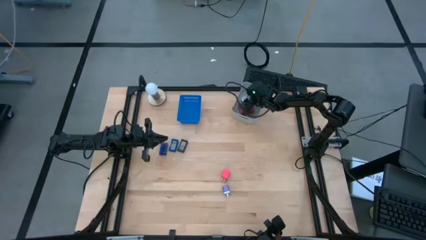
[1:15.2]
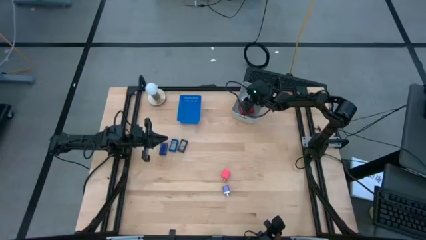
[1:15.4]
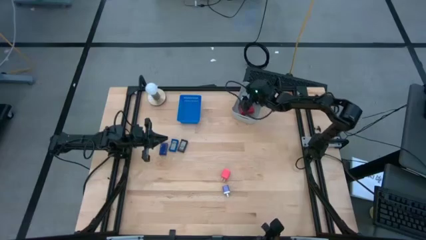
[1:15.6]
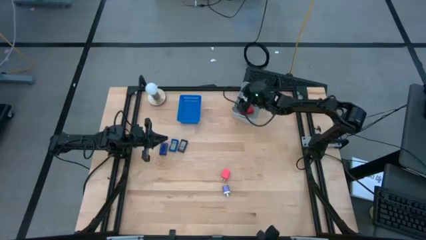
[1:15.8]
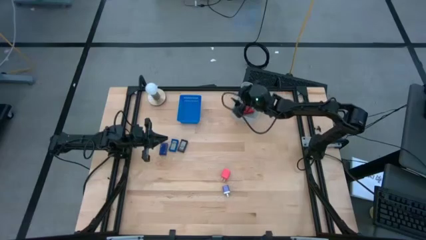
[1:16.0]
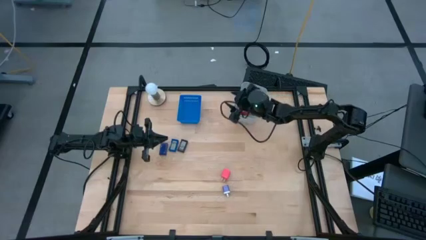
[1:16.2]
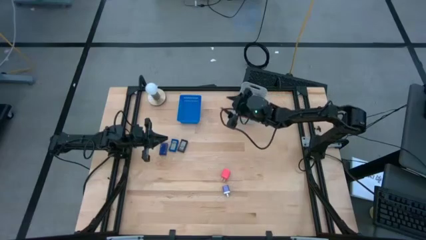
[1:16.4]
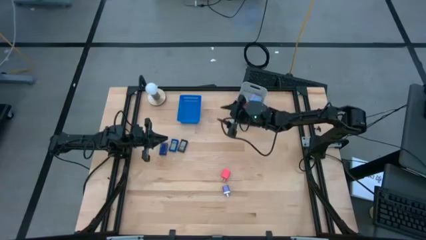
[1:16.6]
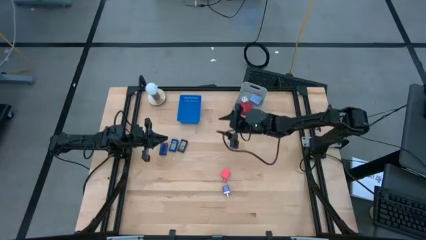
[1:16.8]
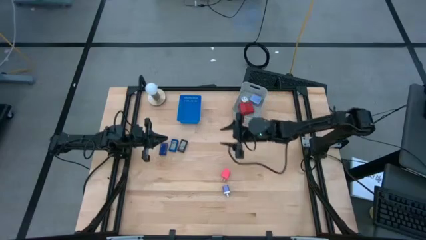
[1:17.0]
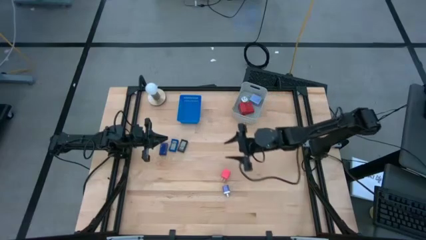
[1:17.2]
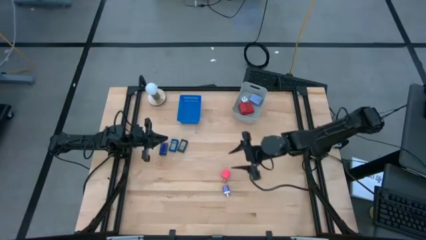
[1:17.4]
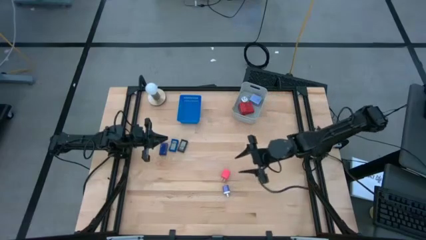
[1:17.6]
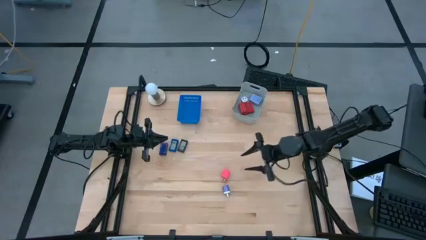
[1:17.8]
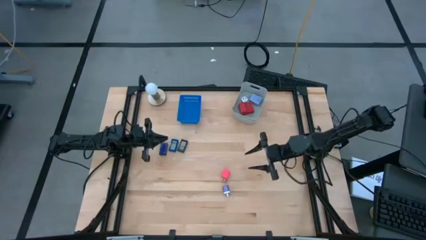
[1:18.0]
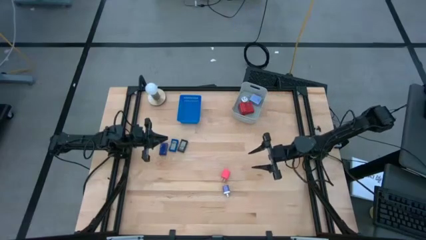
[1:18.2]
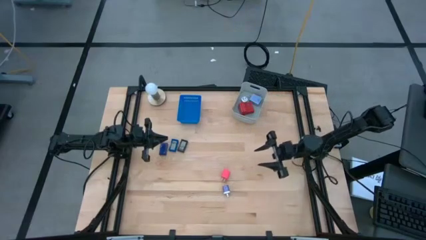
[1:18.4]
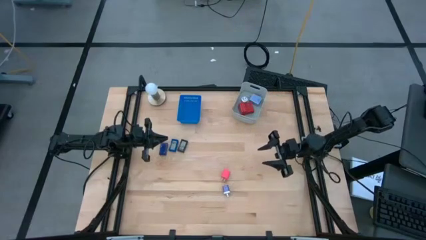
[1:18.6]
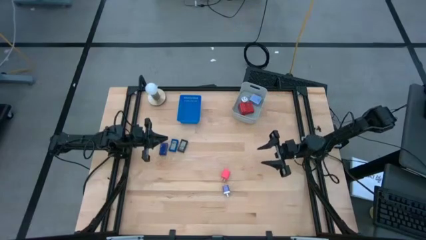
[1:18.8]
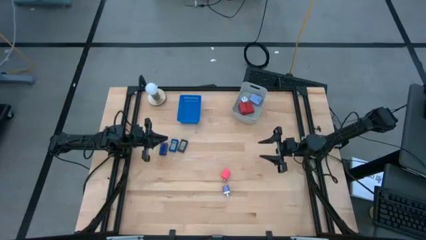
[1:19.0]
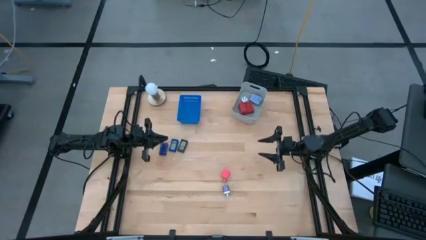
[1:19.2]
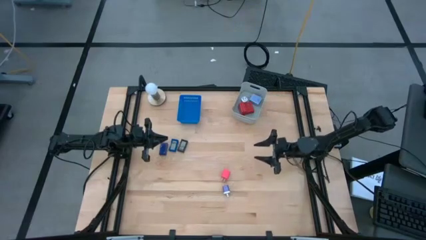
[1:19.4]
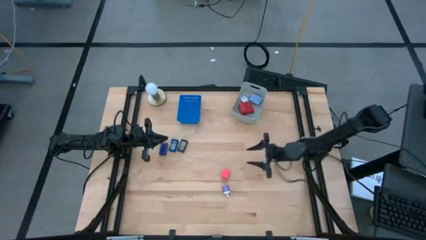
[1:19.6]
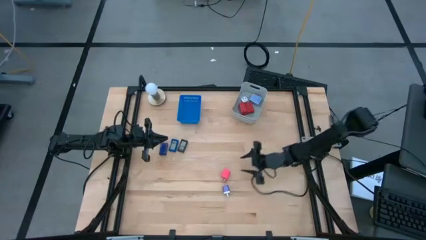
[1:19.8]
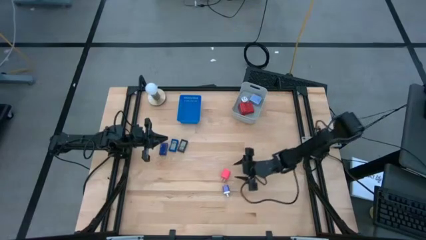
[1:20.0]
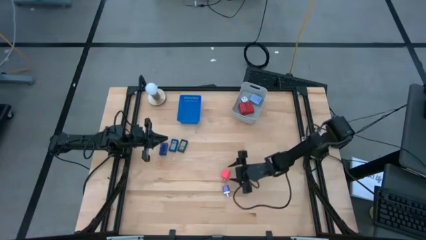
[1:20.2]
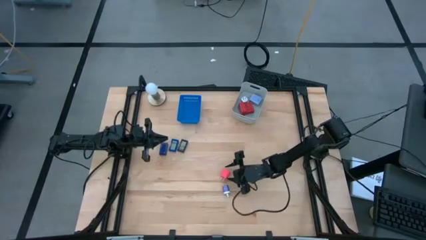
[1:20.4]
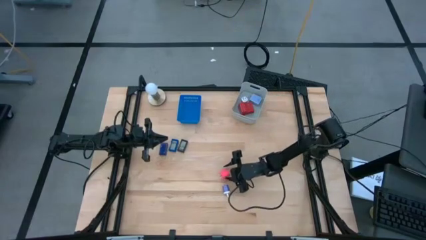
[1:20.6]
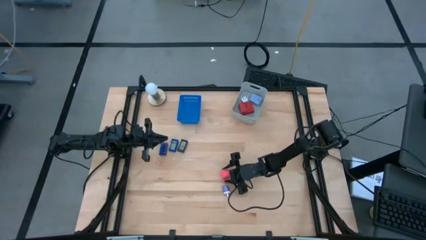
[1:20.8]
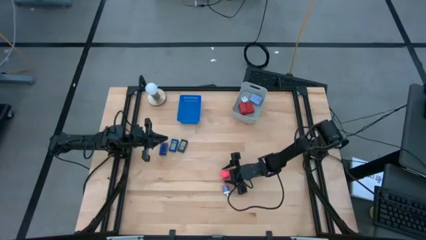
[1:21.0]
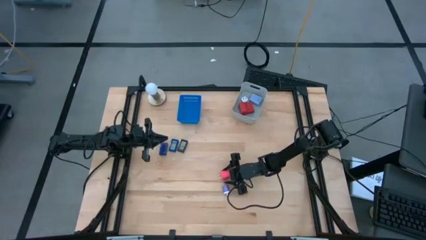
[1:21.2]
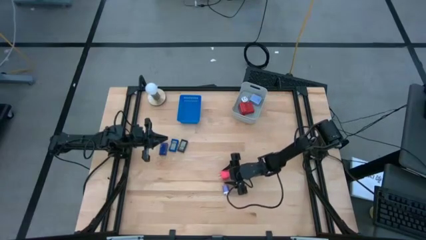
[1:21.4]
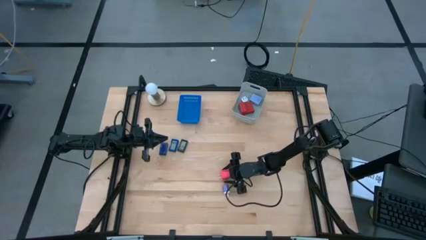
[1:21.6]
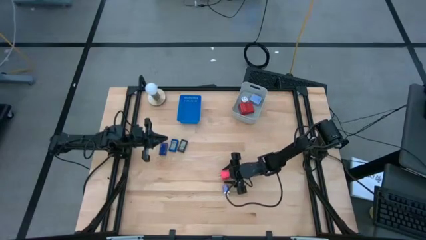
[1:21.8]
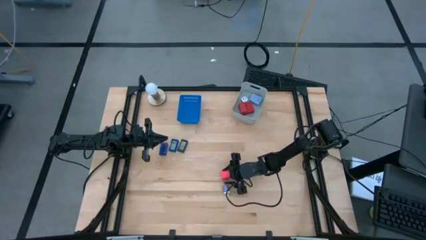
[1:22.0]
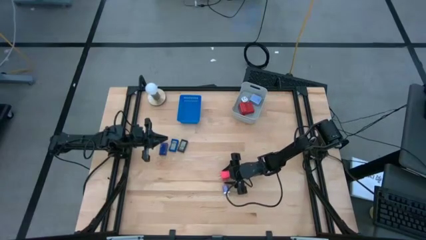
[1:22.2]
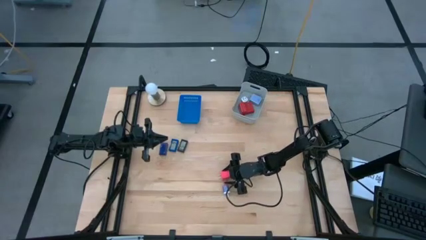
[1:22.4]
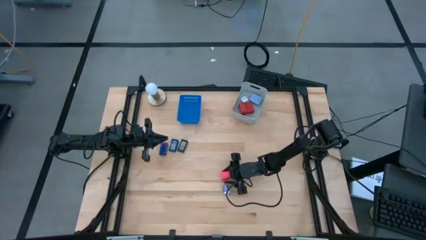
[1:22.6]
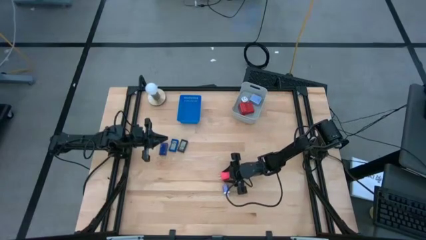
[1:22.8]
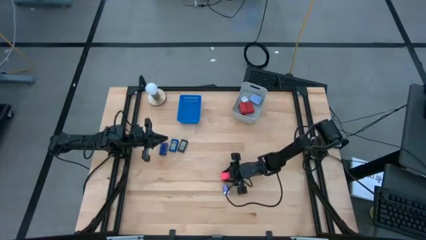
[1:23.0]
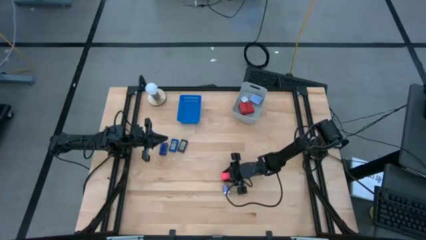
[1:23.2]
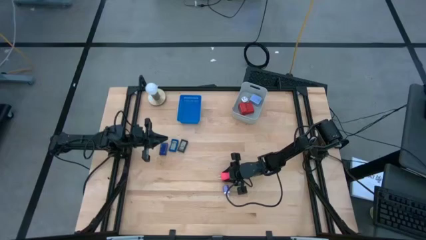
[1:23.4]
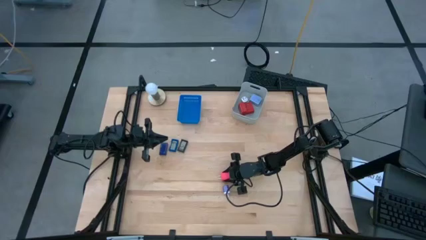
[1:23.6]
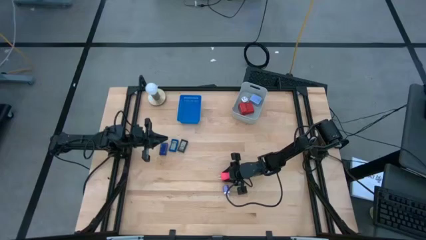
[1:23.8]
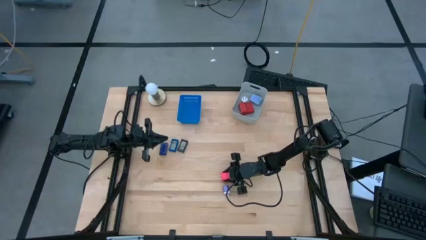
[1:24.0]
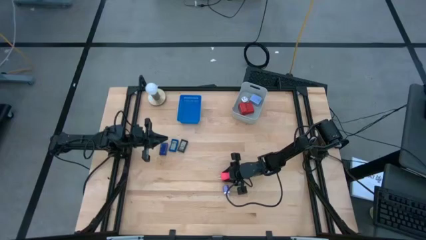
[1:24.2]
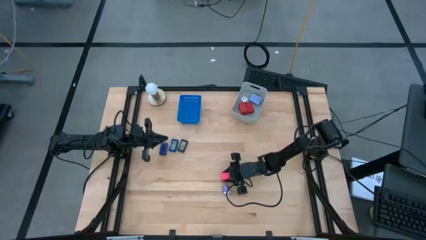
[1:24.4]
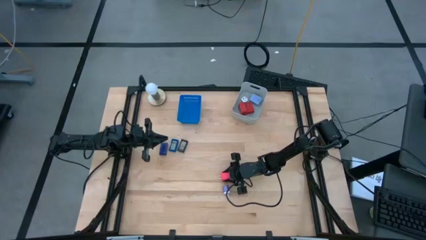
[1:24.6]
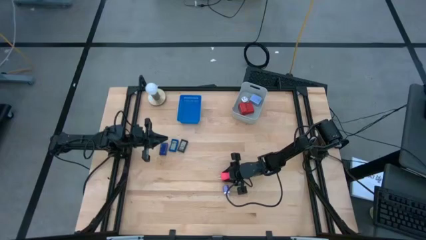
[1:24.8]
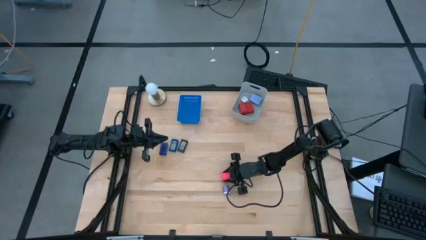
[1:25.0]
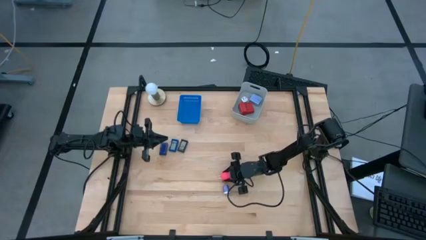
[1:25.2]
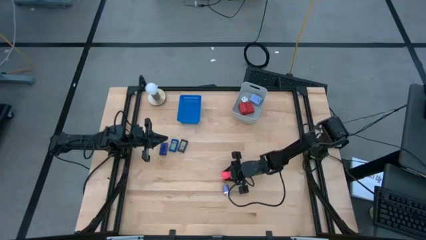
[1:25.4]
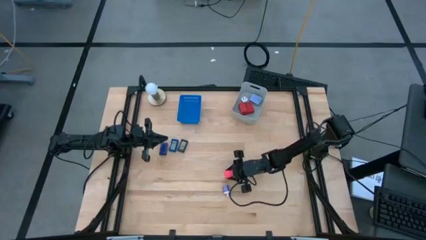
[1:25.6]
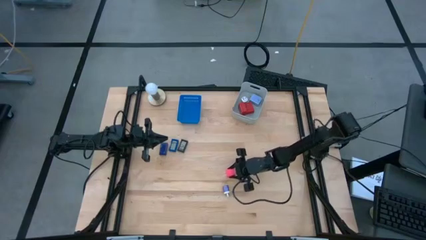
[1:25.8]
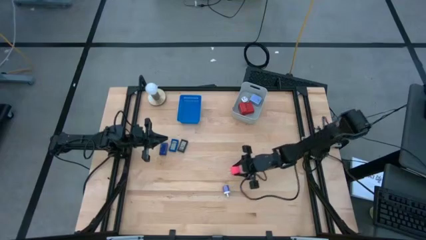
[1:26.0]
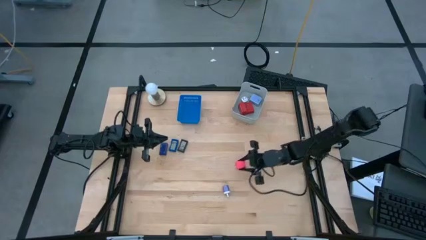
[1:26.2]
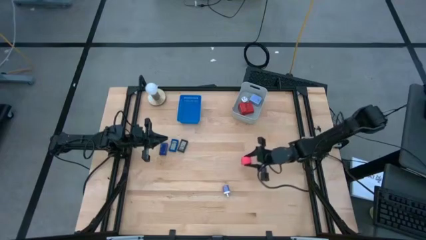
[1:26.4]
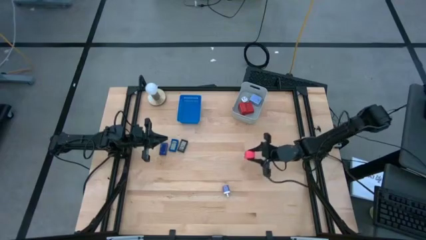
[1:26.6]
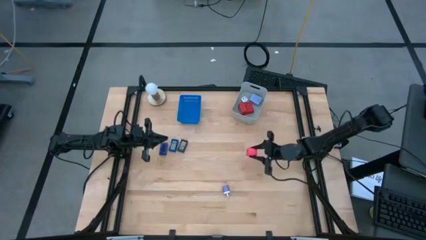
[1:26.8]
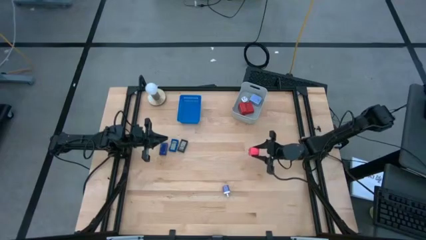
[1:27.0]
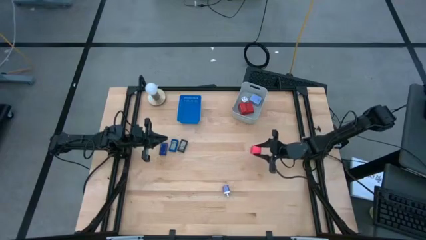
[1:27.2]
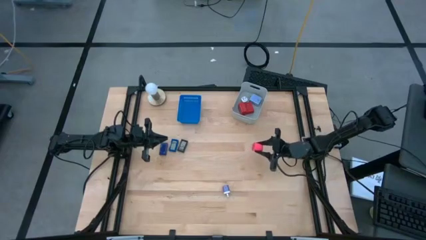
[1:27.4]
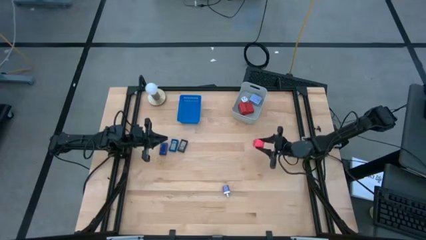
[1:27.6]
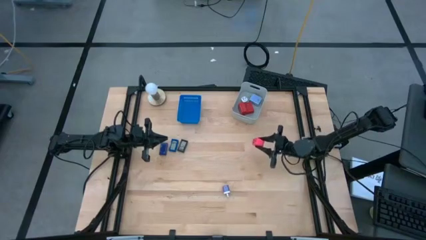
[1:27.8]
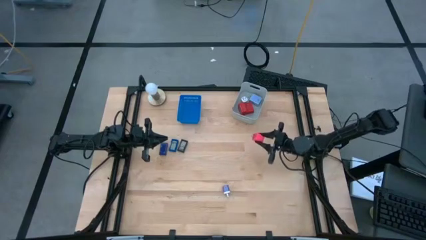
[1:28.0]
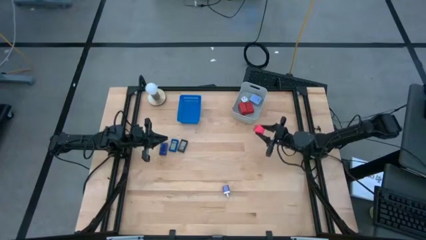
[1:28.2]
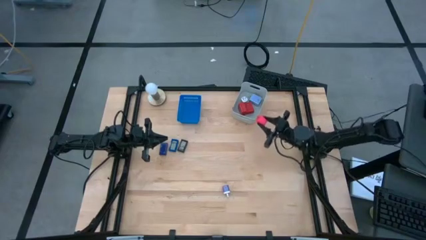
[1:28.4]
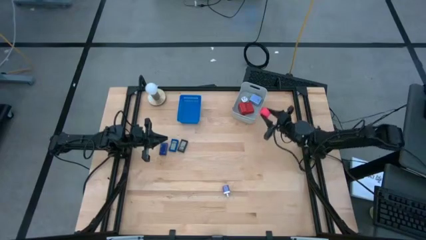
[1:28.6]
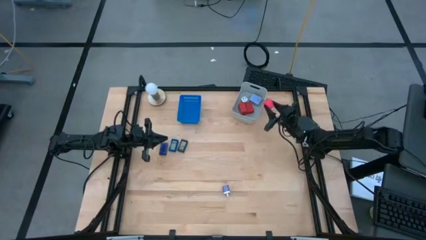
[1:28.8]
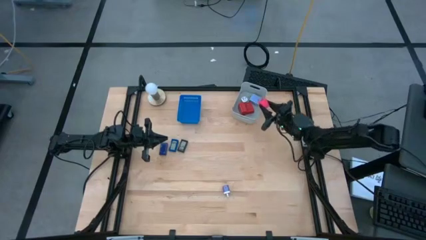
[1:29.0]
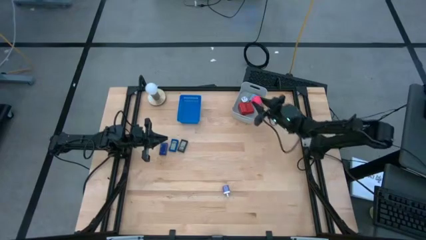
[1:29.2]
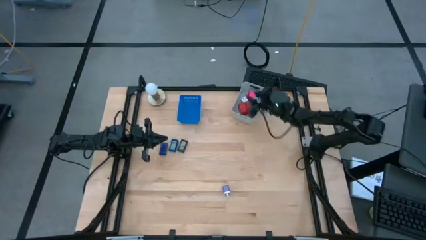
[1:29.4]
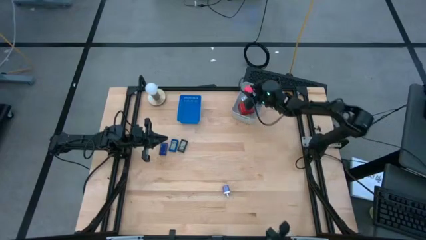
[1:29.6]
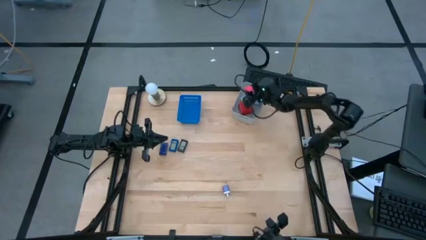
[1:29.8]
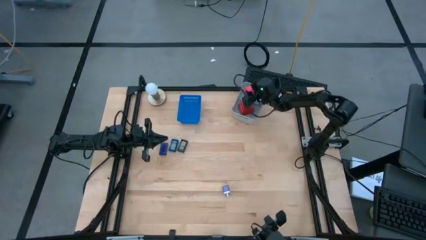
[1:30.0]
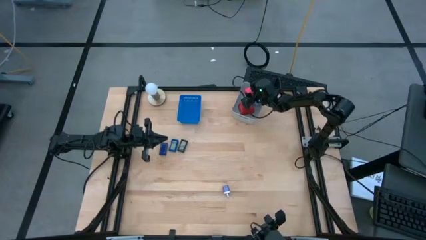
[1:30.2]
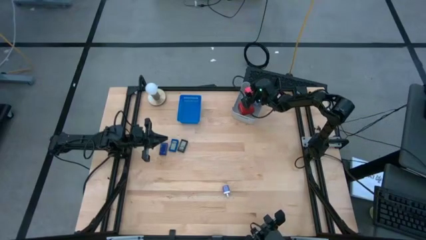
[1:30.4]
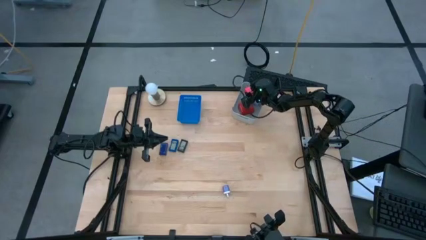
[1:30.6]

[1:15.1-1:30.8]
Task: Pick & Place Office items
Put the pink charger adapter into the gray bin
